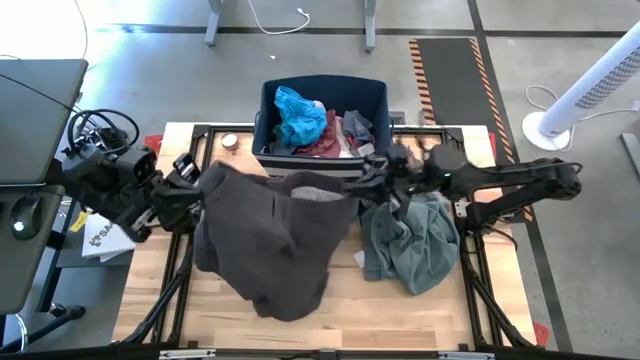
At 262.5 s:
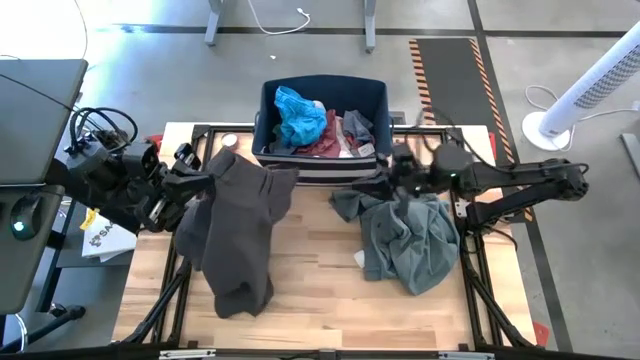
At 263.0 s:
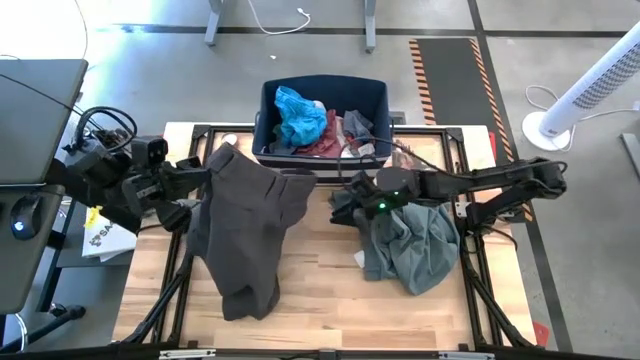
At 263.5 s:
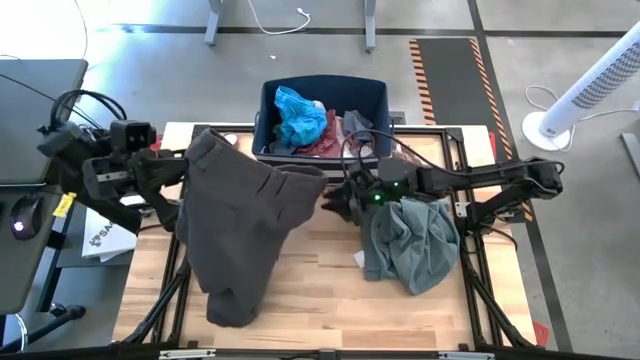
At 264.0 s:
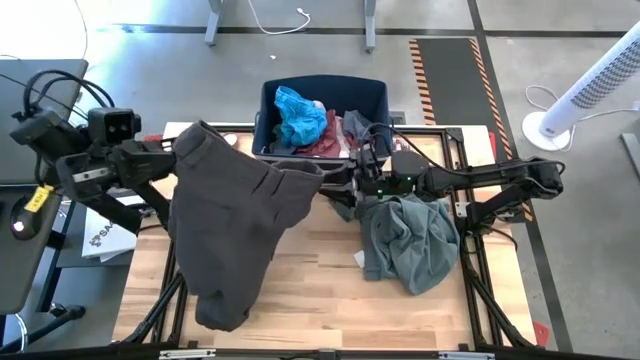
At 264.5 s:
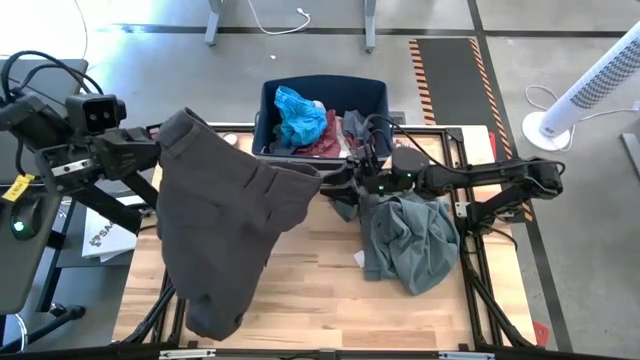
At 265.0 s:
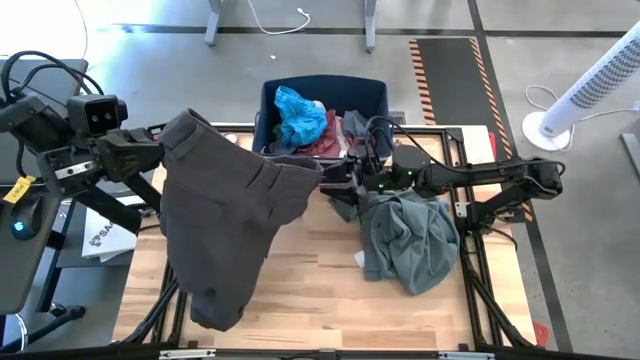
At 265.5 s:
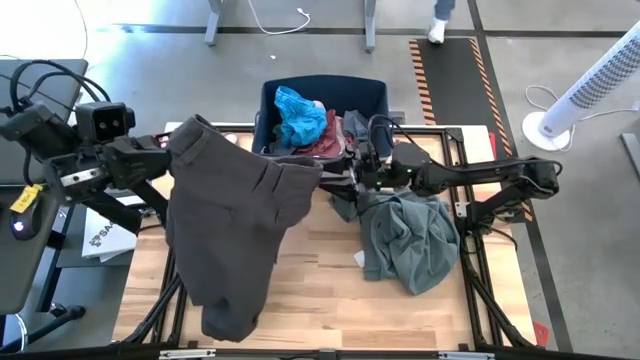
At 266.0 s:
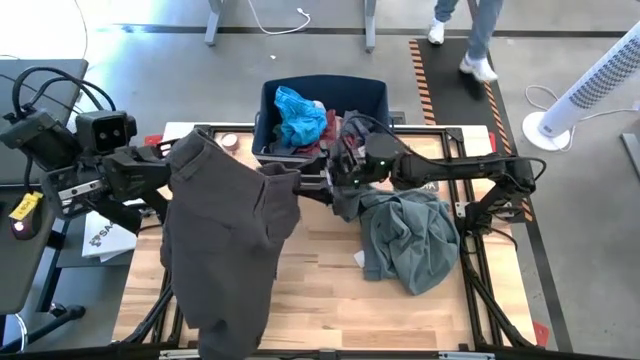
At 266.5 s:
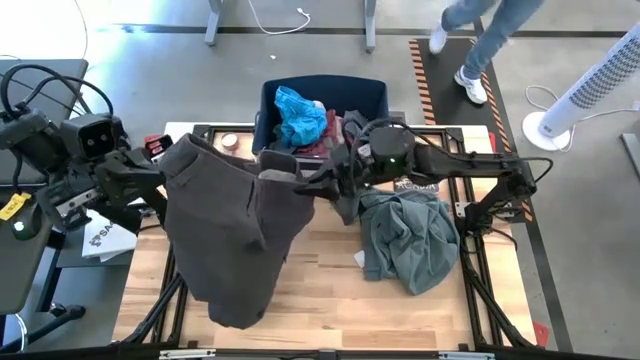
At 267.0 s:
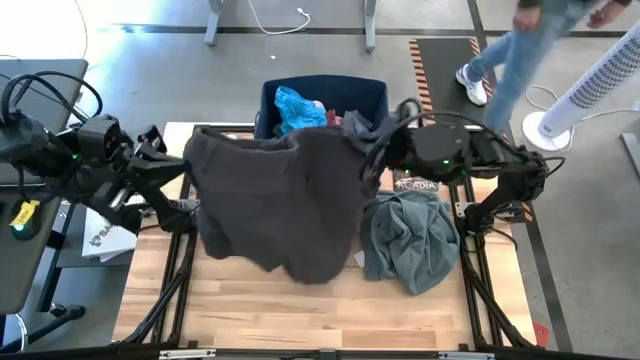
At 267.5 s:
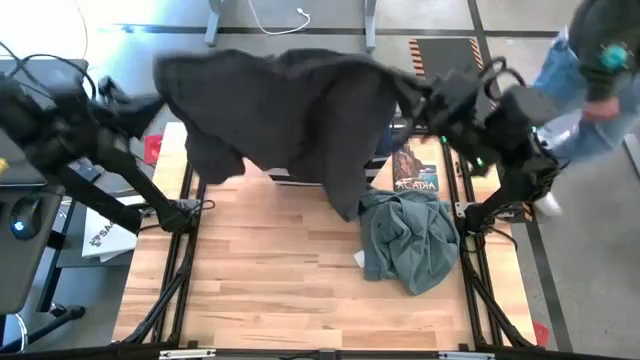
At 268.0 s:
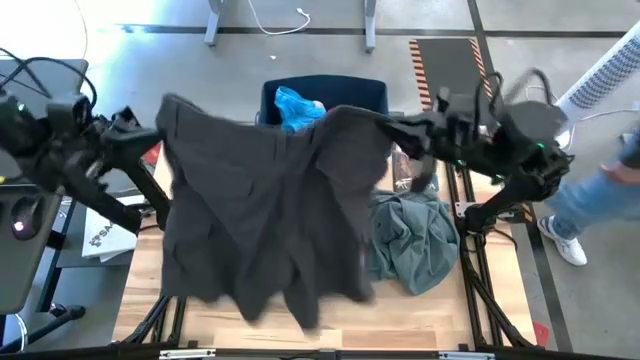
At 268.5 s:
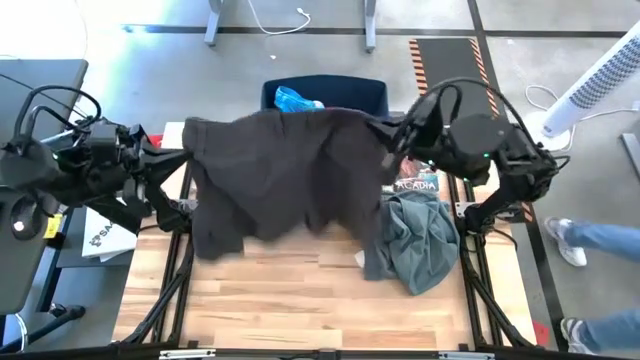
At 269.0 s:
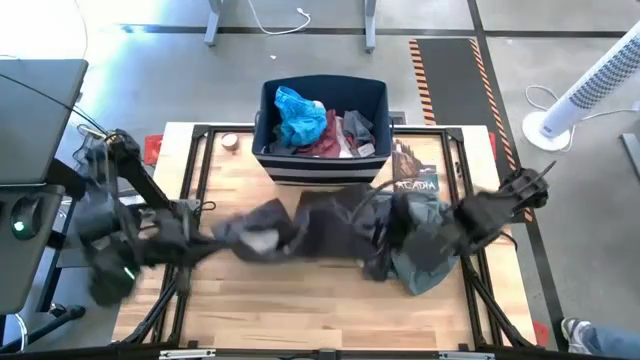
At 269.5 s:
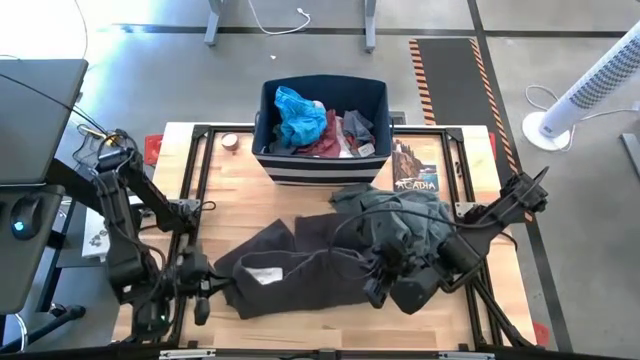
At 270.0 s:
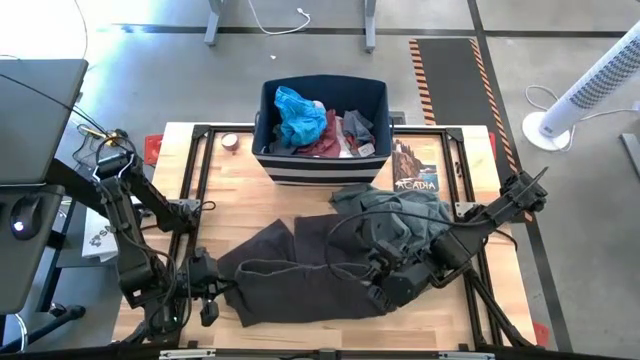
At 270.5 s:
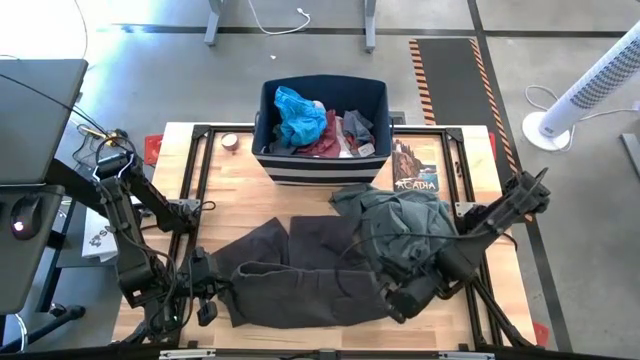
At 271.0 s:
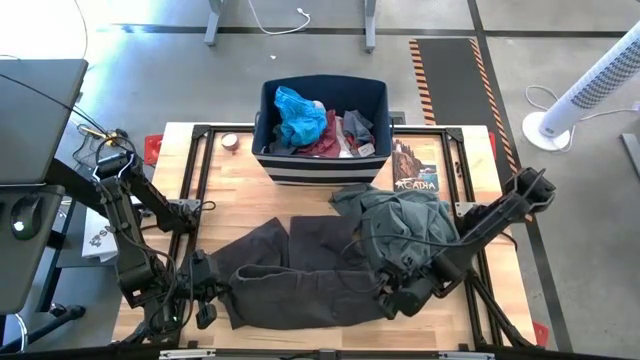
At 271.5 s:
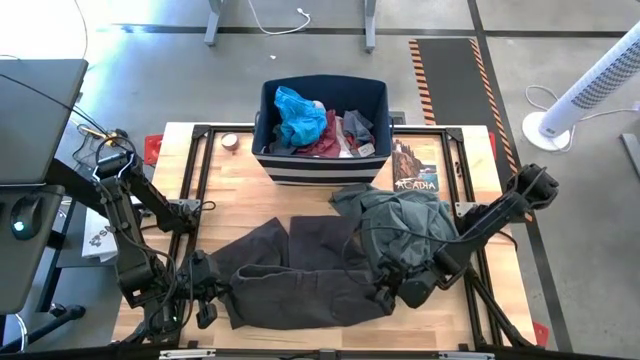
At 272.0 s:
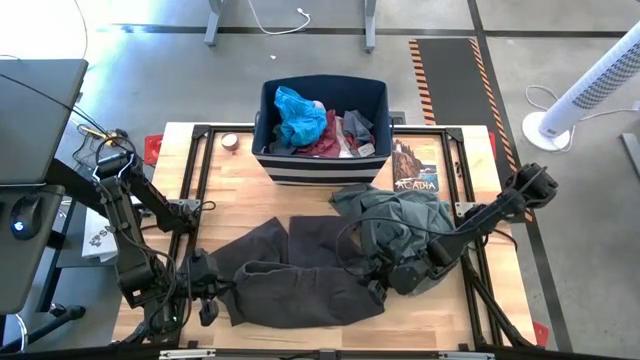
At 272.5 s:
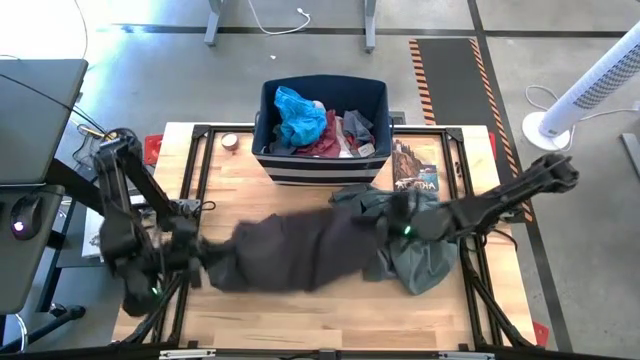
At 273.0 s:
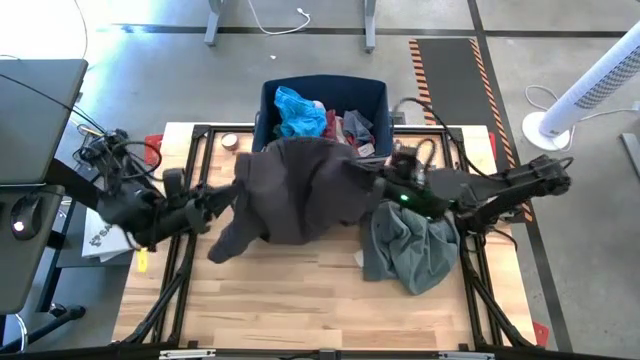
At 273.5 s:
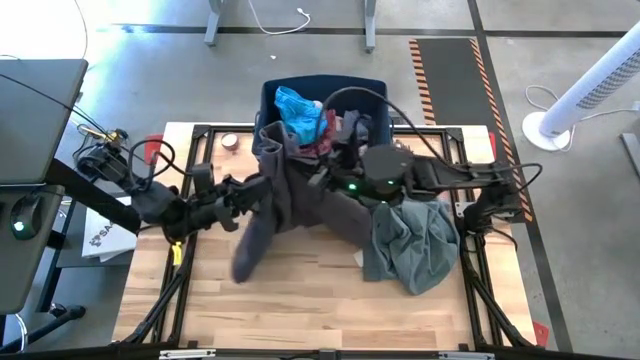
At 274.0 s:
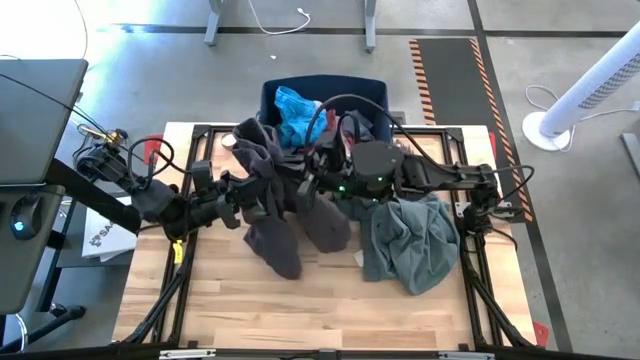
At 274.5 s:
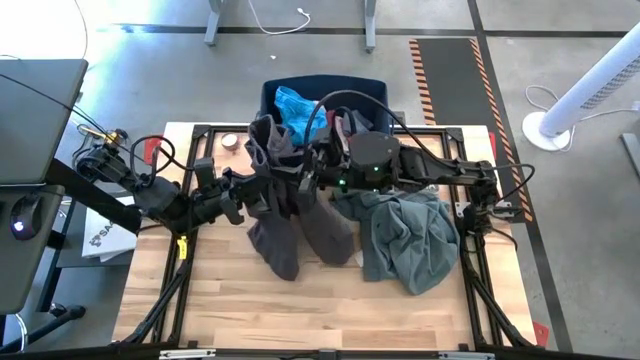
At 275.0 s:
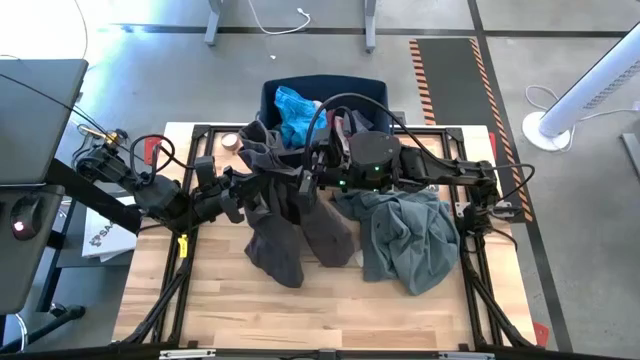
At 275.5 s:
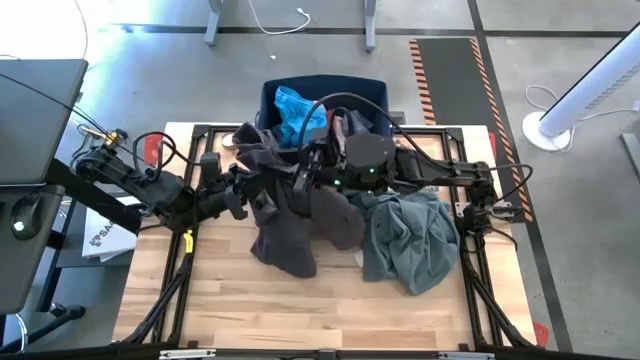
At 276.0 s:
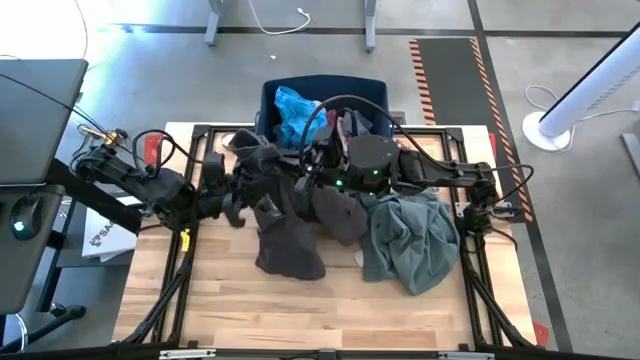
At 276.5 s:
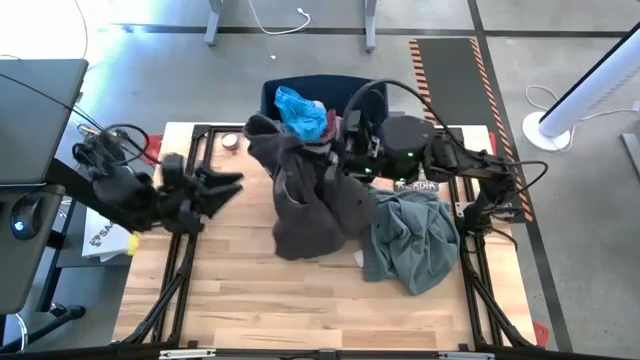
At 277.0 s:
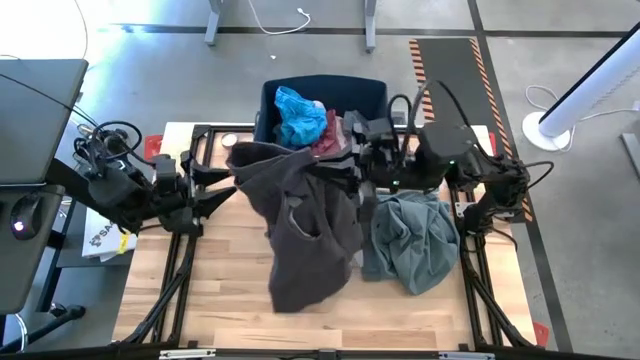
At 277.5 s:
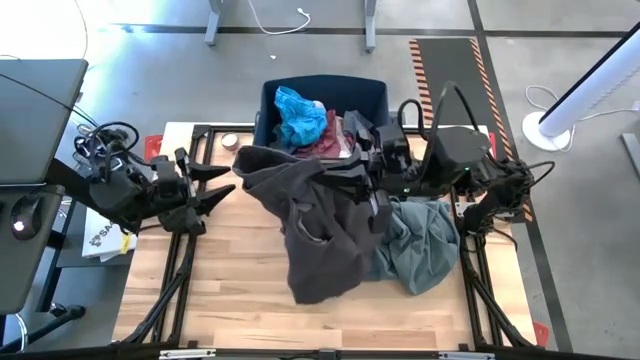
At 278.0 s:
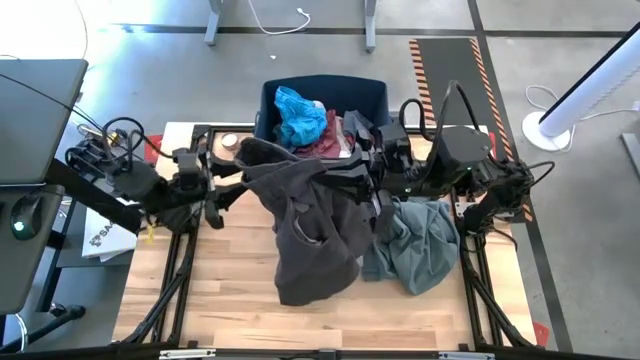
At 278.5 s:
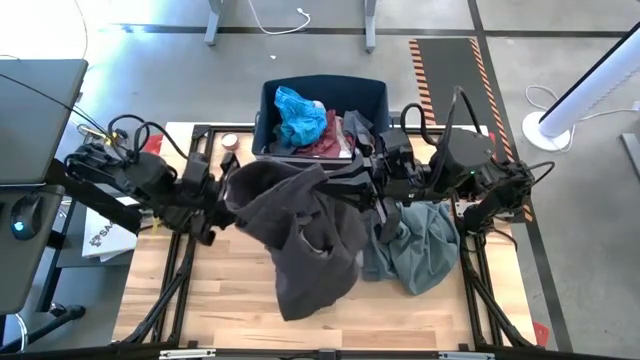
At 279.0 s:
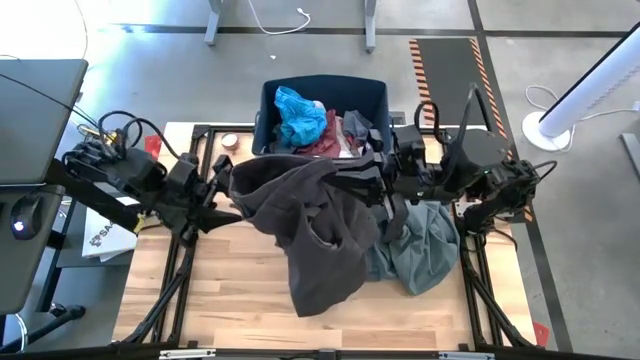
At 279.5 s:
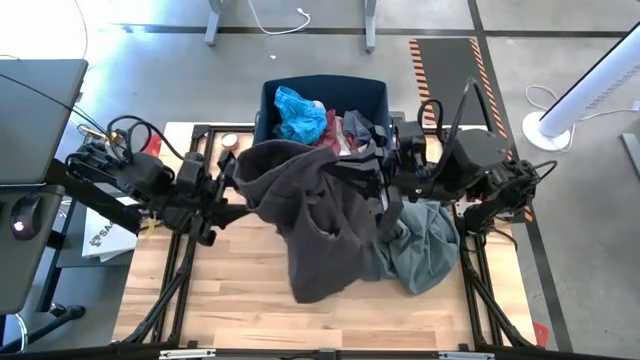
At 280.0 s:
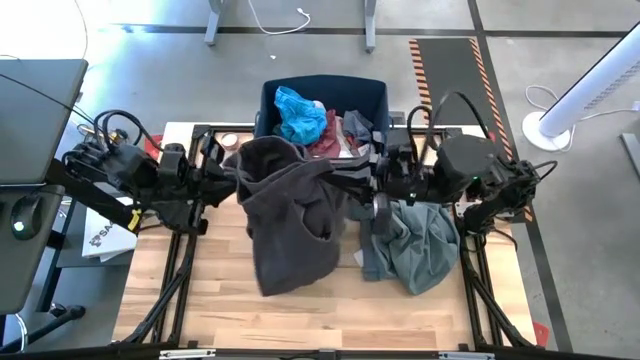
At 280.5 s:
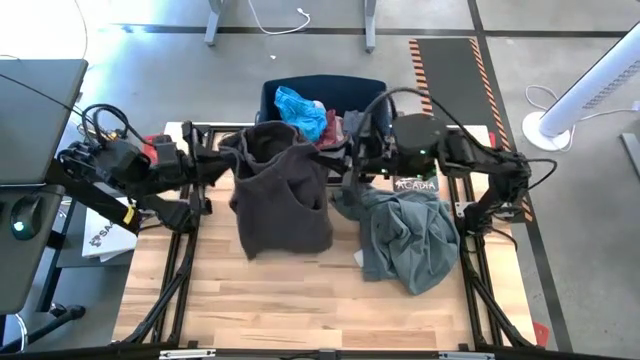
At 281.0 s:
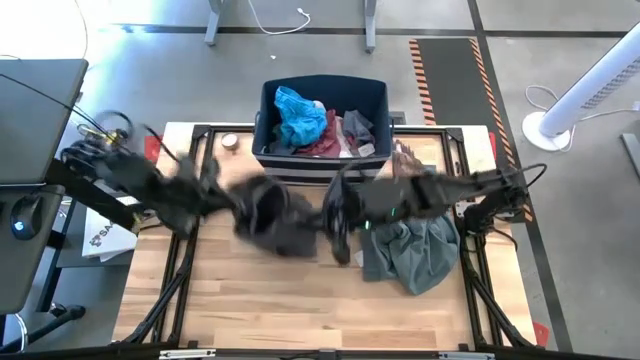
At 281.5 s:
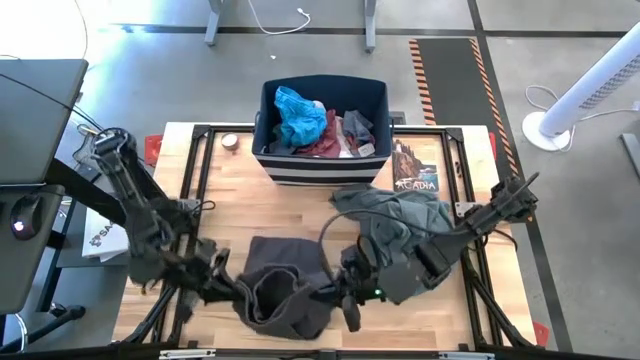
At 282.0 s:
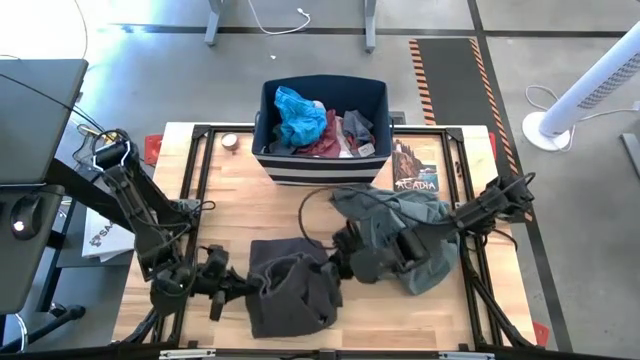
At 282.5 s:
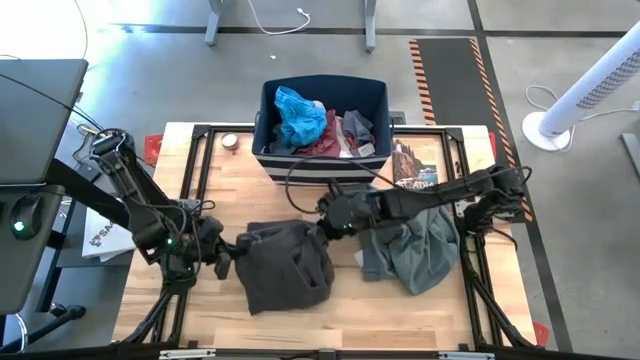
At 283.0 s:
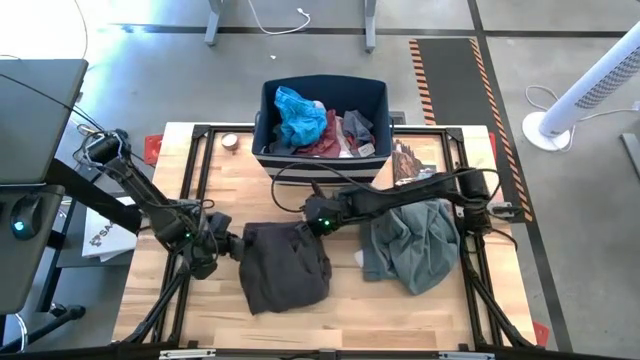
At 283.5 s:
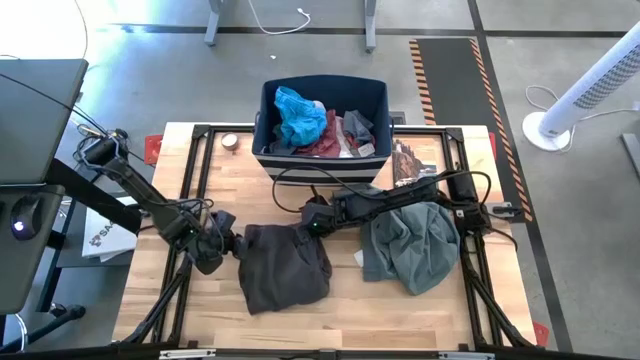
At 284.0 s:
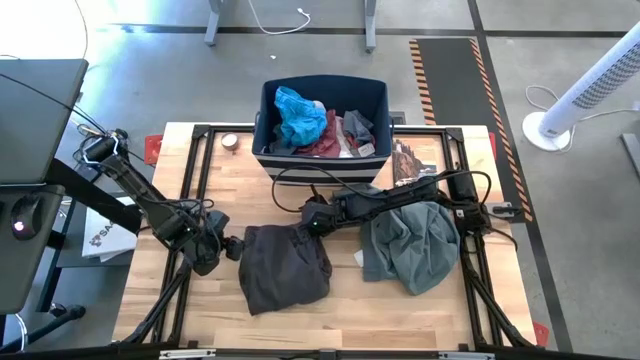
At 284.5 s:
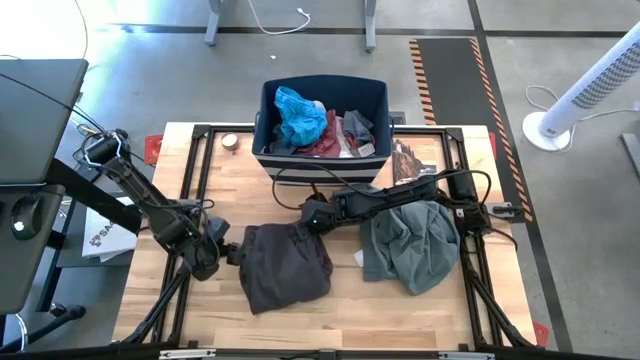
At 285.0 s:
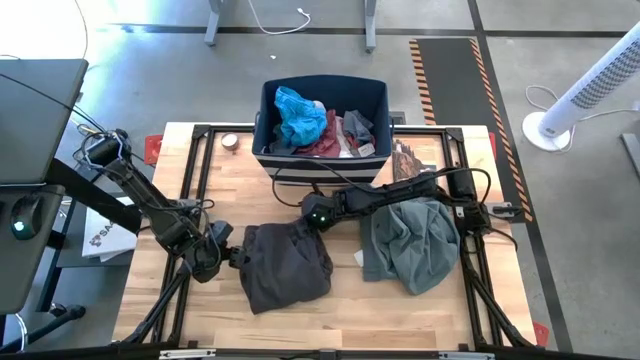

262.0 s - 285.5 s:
Task: Sort clothes
Fold the dark grey short
